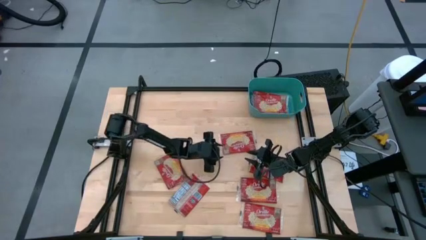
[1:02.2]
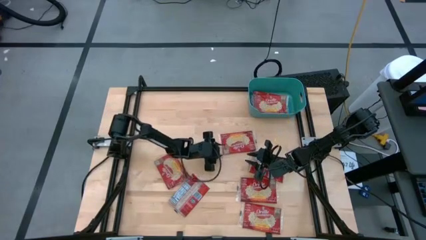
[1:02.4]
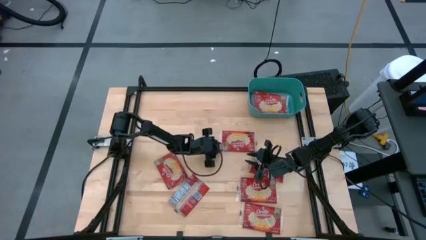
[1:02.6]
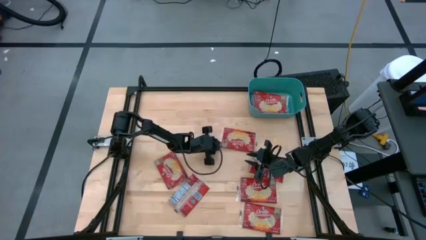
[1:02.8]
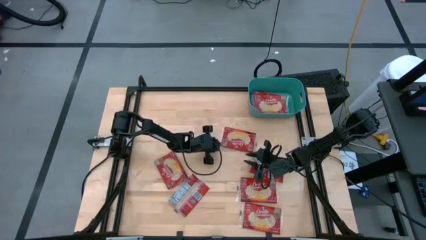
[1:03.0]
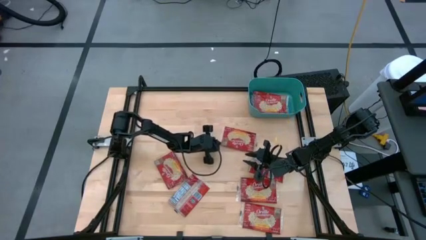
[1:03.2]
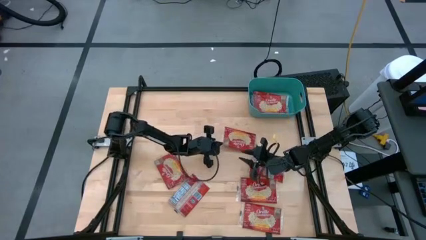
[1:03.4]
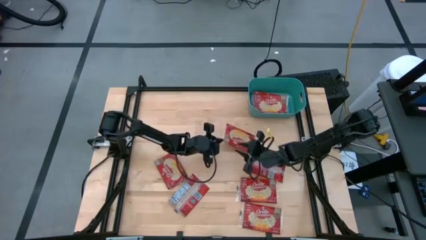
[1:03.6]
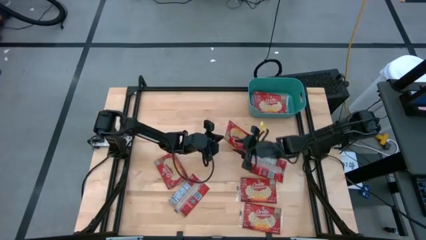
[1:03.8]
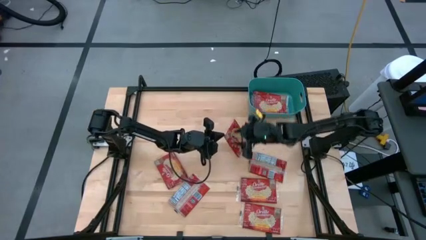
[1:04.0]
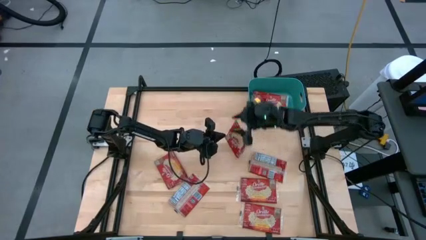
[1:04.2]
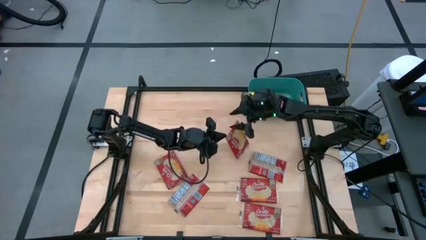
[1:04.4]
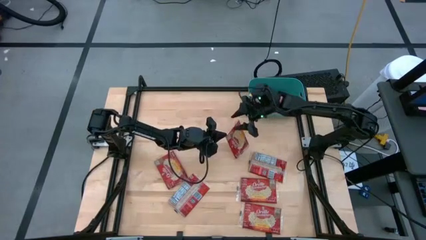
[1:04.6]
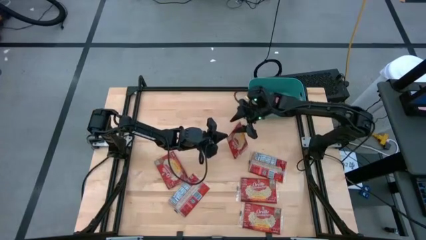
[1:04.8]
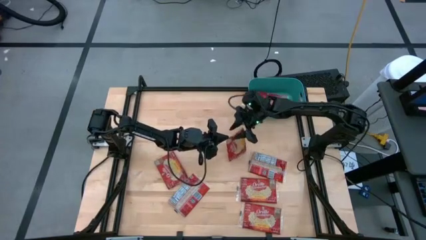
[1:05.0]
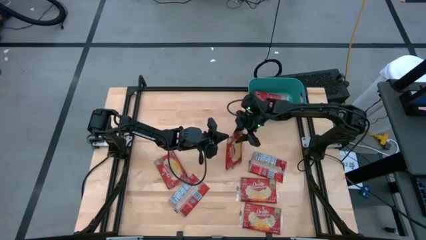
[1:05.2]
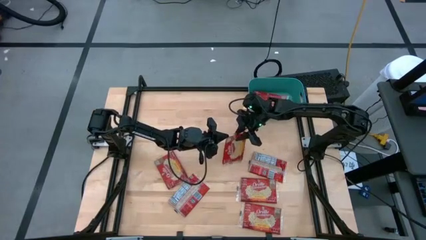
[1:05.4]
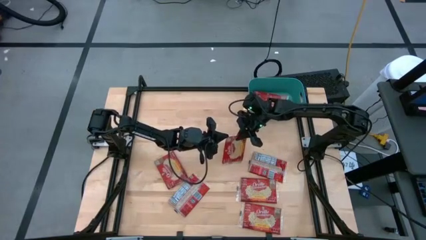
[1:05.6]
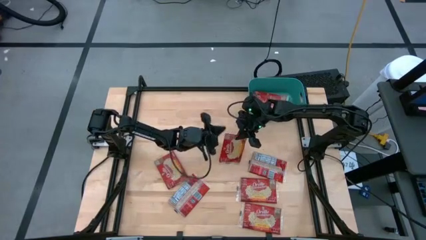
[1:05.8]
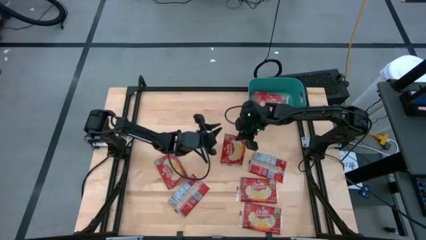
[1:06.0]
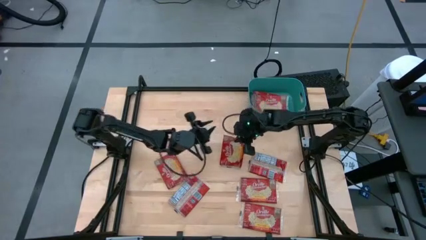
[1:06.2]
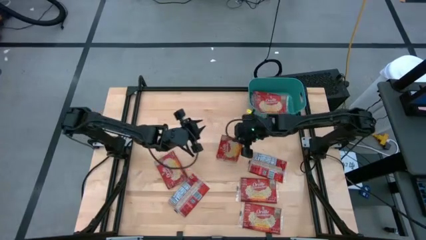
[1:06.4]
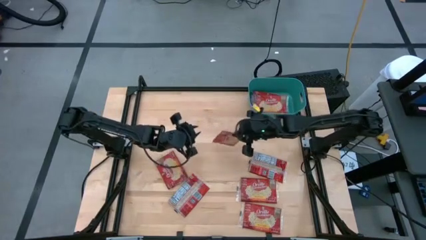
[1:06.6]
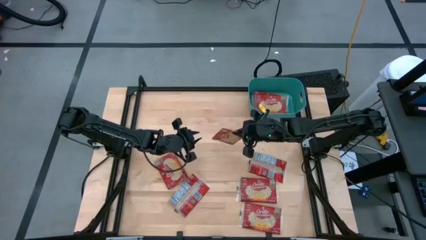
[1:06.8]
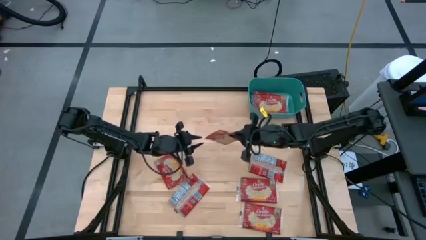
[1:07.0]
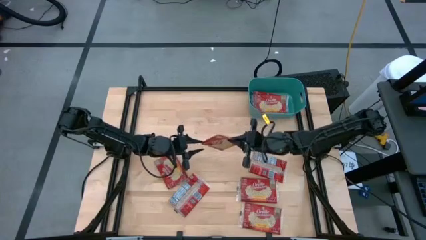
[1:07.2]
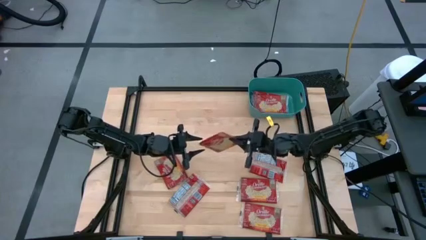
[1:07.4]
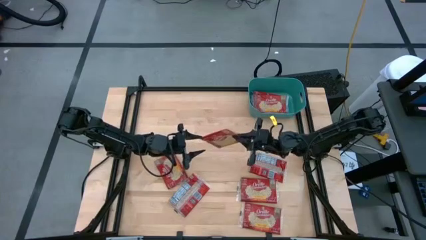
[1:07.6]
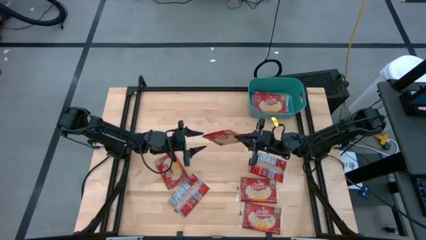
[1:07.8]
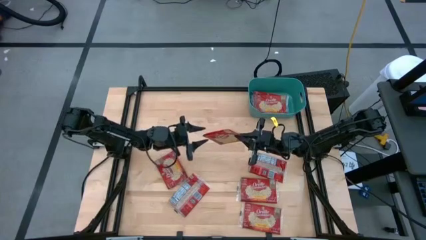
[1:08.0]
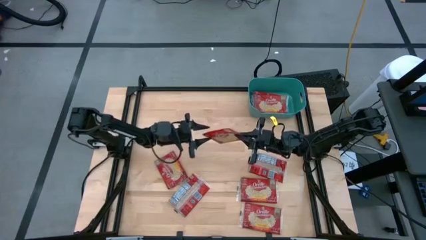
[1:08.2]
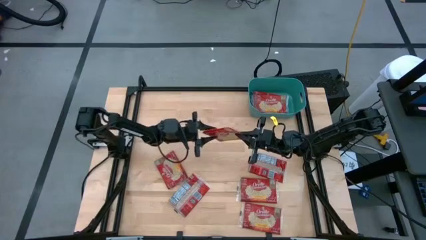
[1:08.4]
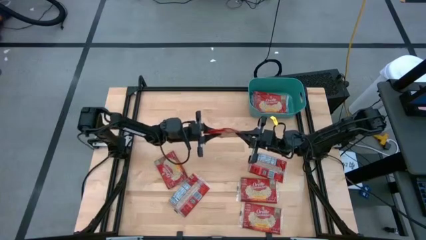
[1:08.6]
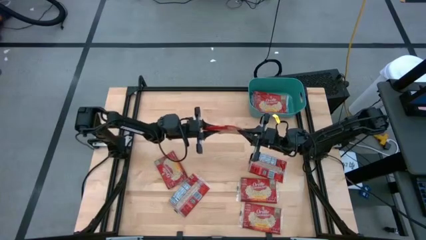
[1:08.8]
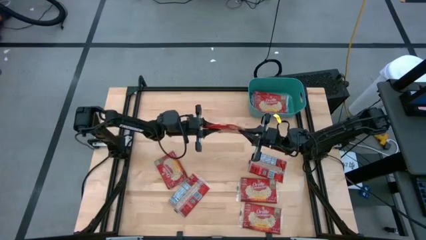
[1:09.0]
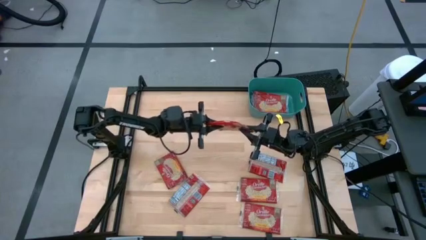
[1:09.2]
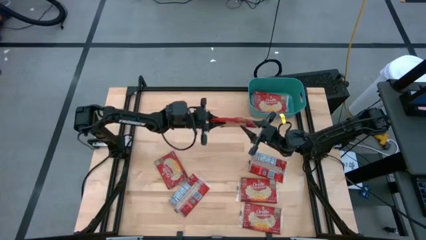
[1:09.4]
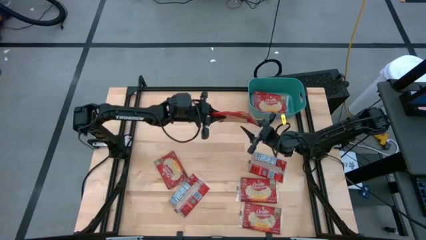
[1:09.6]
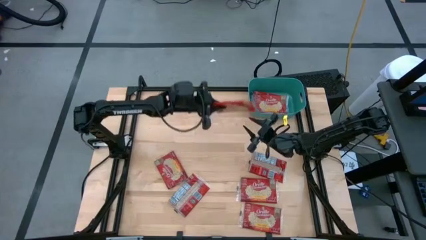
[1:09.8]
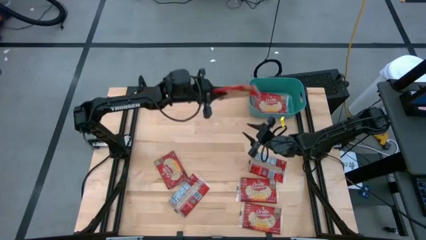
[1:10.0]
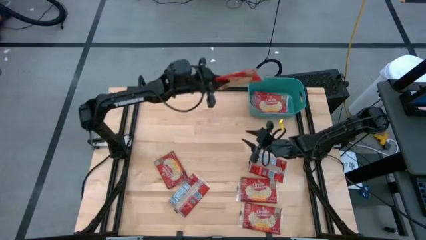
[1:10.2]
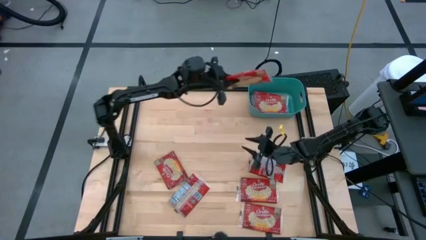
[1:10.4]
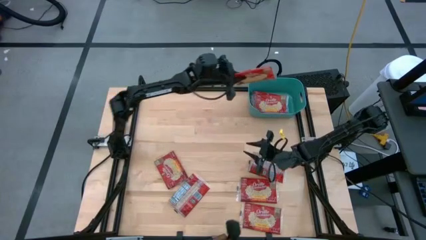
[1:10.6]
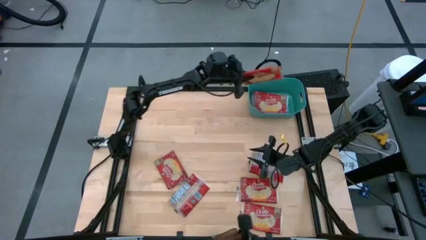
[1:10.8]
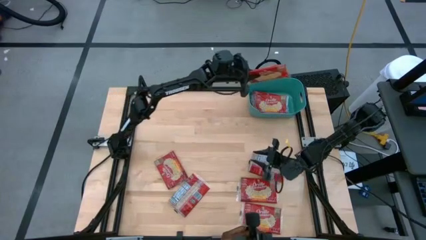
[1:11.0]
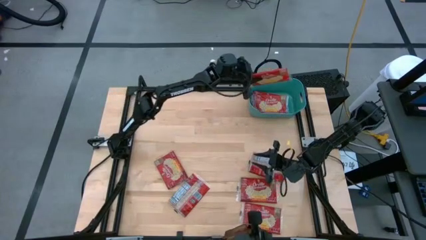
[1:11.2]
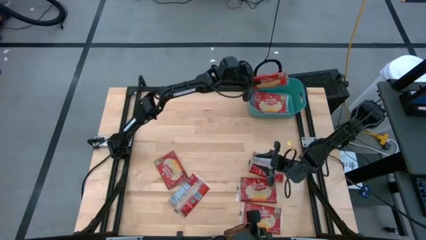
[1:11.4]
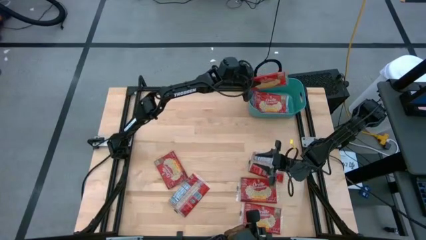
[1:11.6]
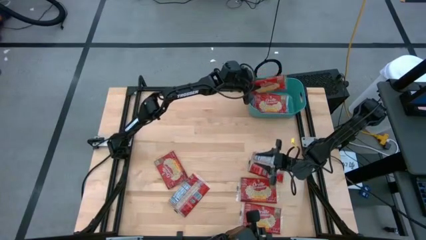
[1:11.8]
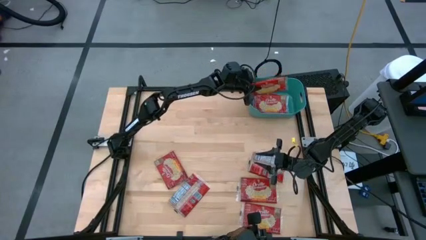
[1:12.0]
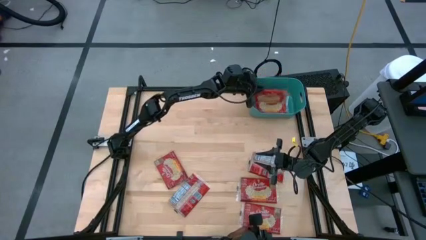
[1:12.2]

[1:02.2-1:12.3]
Task: Sort popcorn bags into baskets
Put the red popcorn bag into the blue bin

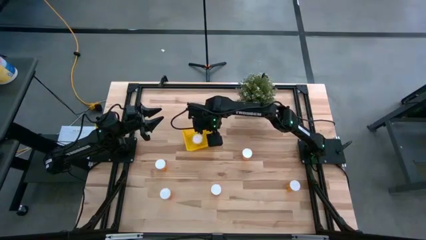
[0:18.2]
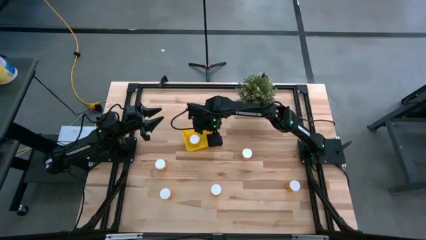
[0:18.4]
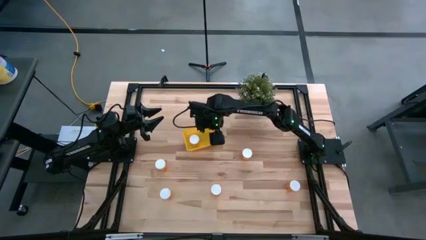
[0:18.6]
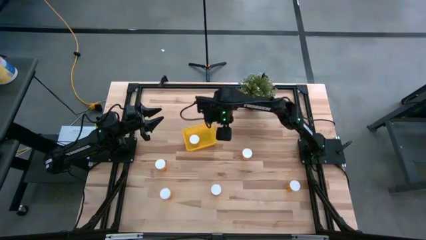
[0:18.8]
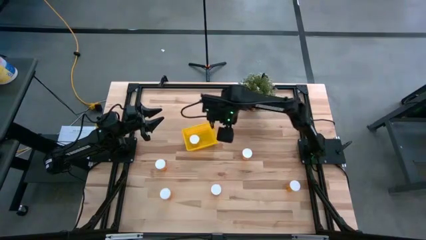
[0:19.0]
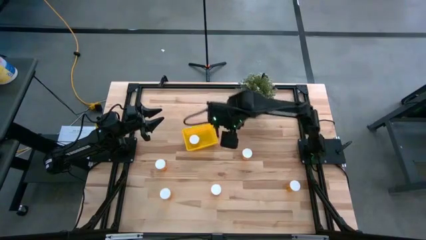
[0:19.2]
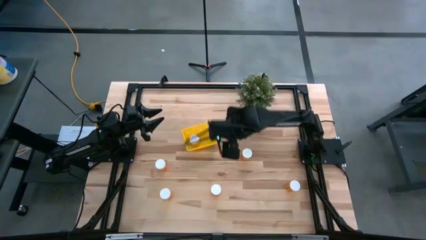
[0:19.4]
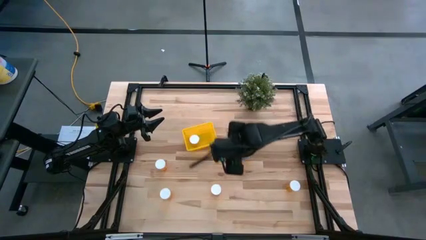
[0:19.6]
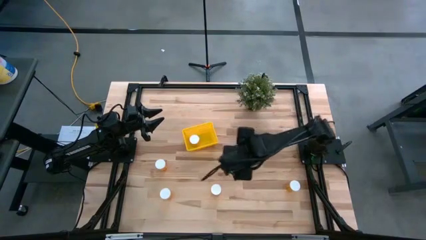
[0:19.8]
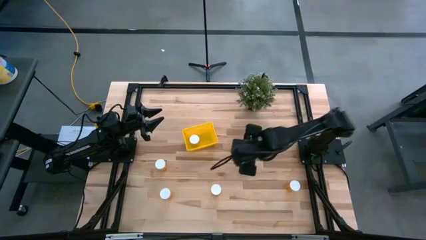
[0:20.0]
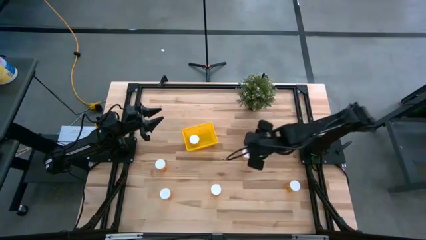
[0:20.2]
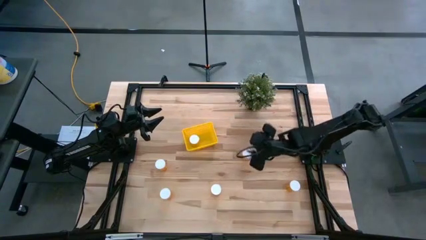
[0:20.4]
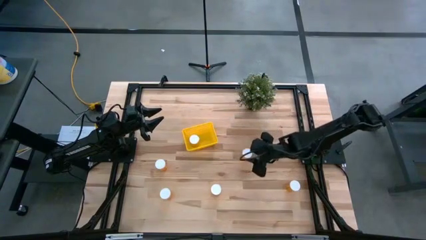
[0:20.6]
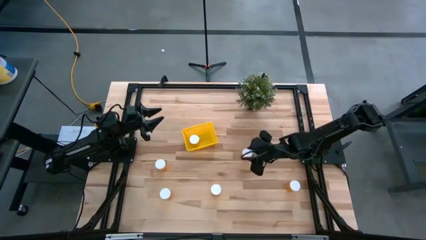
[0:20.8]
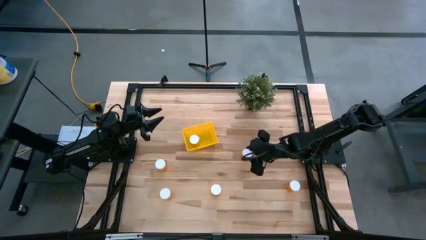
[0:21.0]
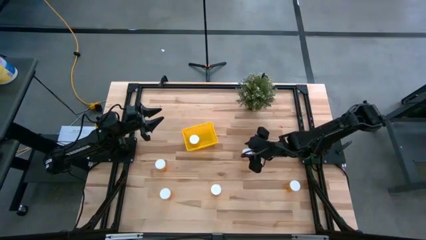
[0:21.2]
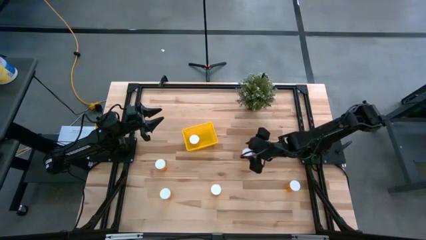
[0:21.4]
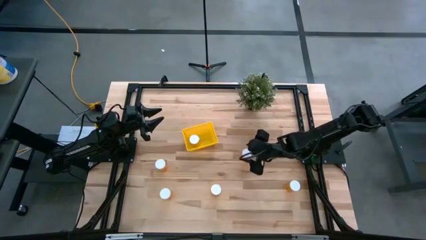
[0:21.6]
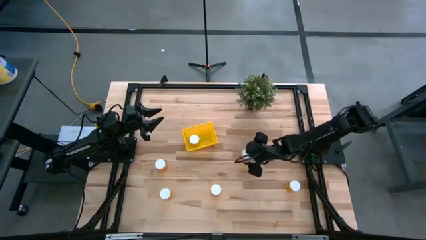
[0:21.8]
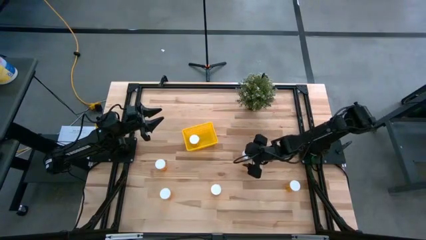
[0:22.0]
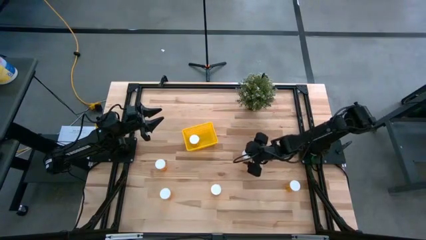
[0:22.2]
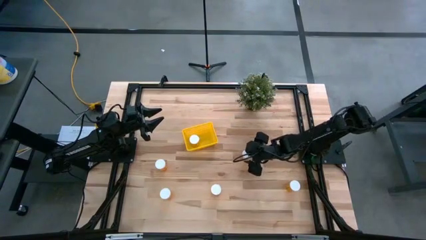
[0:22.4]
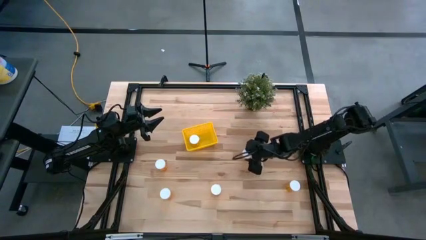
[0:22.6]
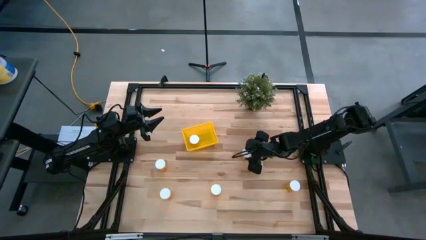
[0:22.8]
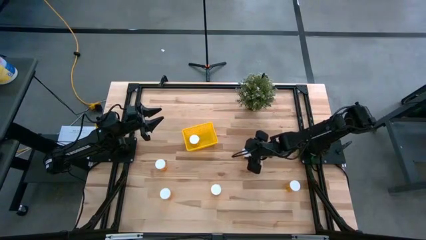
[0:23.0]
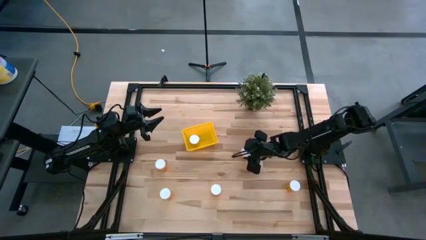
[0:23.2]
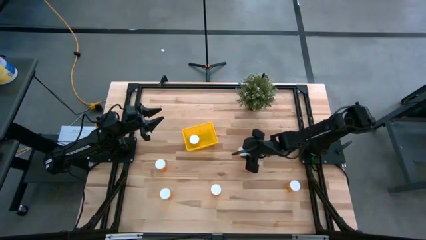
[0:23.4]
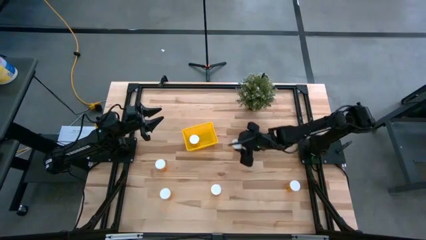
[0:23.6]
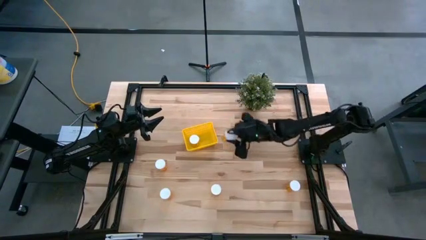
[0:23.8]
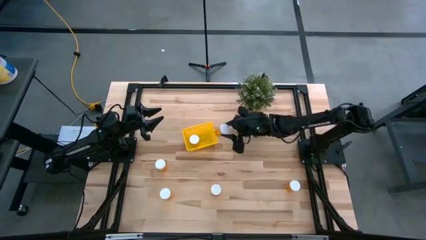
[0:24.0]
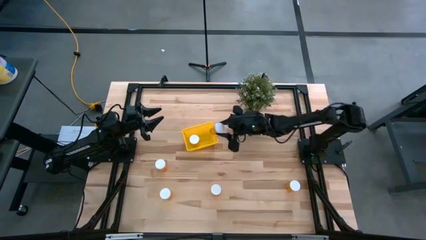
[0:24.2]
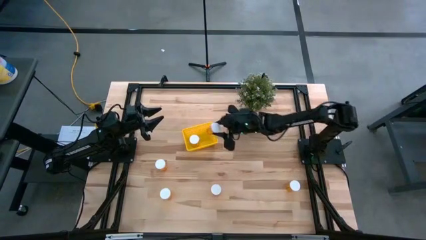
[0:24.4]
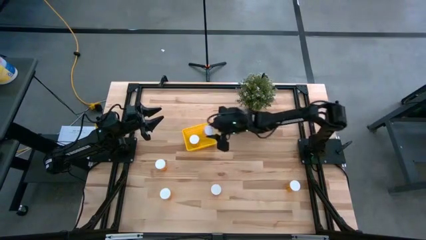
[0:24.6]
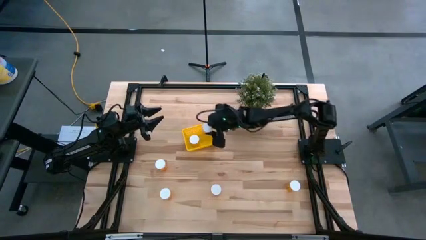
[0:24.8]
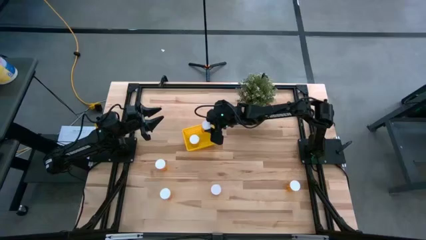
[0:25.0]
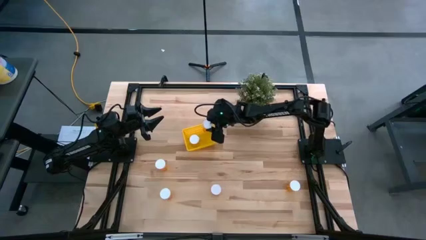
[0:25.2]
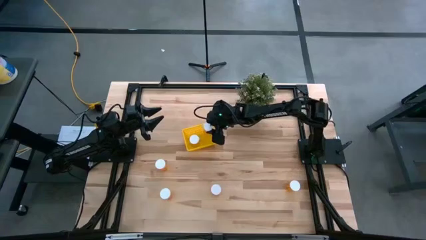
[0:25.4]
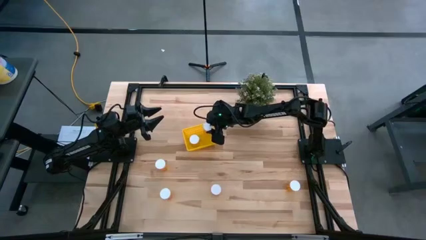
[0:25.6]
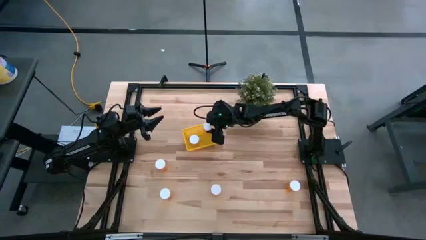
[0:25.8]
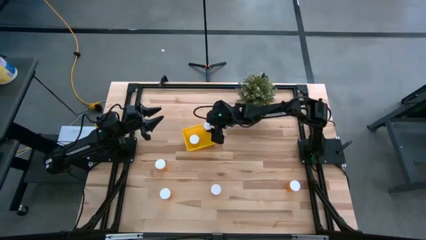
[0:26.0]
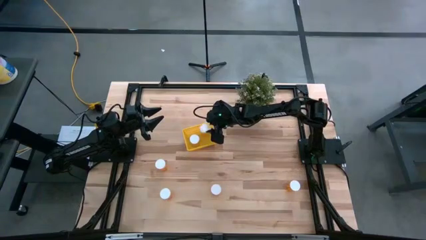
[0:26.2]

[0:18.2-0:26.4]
Task: Pick and place pill bottles into a basket
Put the orange pill bottle into the yellow bin
